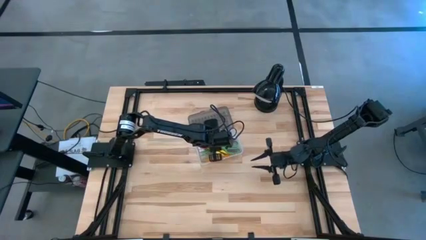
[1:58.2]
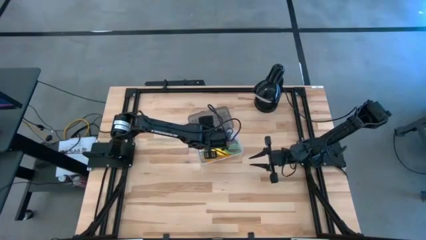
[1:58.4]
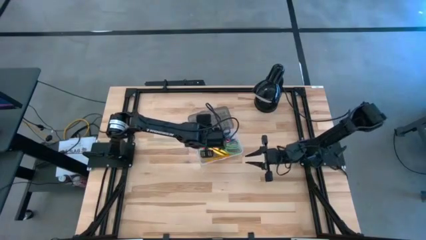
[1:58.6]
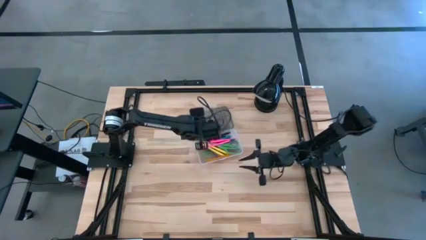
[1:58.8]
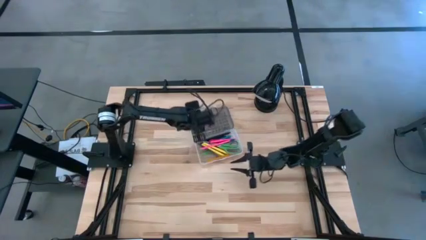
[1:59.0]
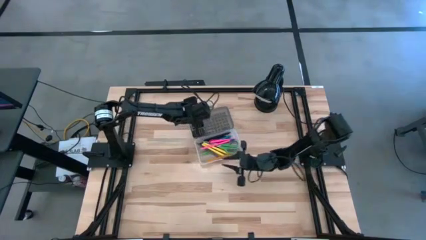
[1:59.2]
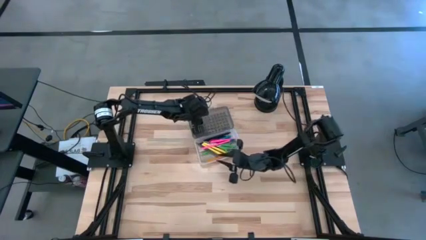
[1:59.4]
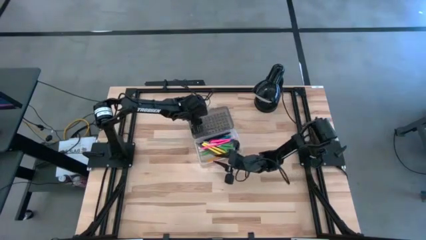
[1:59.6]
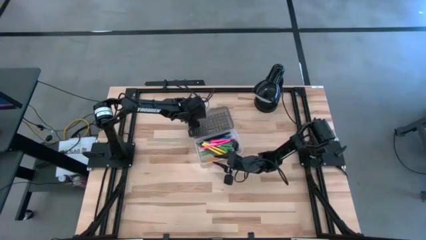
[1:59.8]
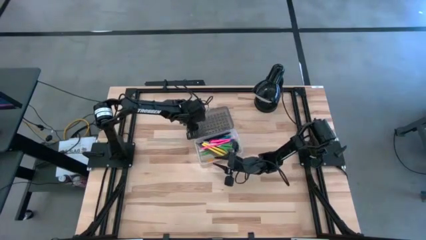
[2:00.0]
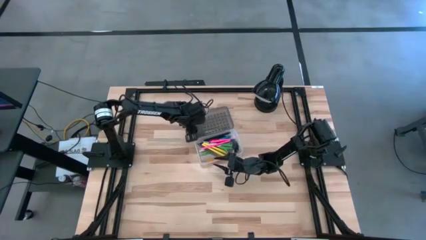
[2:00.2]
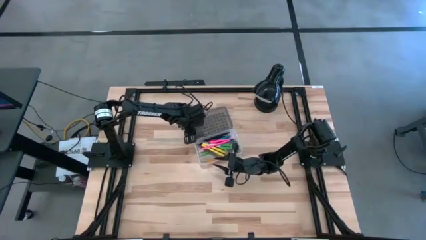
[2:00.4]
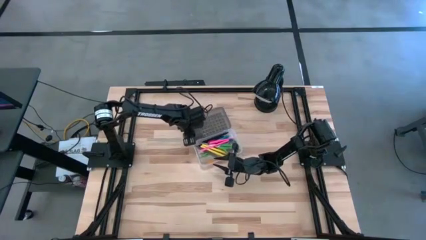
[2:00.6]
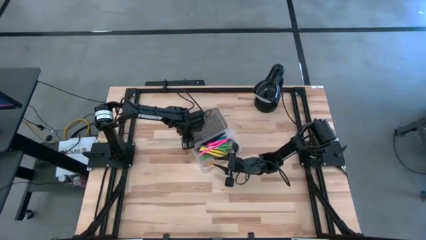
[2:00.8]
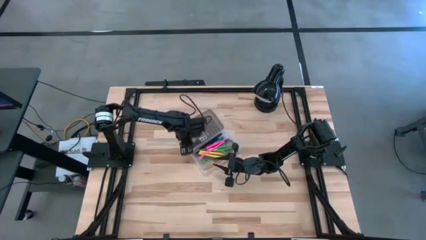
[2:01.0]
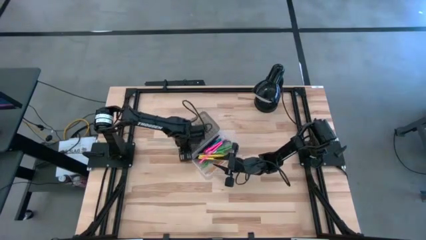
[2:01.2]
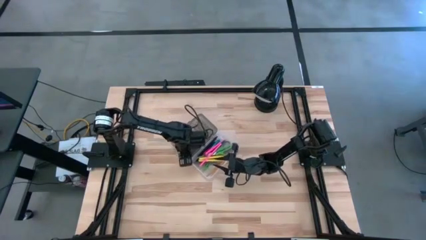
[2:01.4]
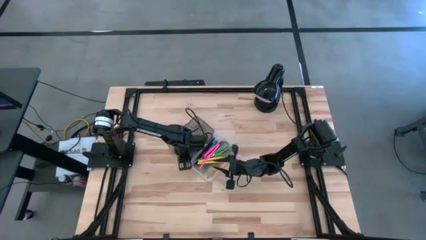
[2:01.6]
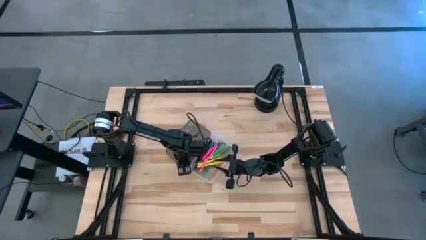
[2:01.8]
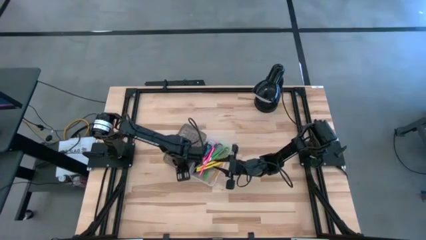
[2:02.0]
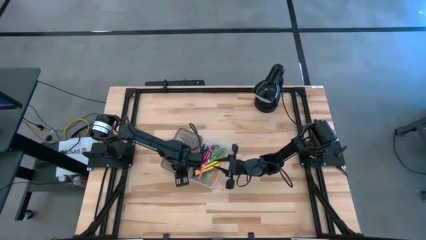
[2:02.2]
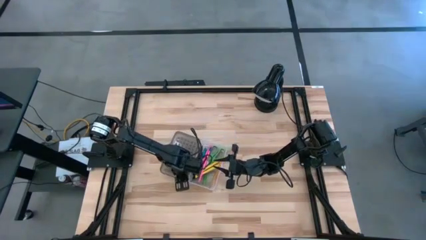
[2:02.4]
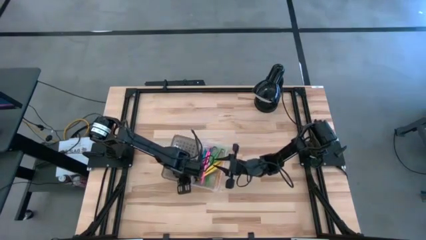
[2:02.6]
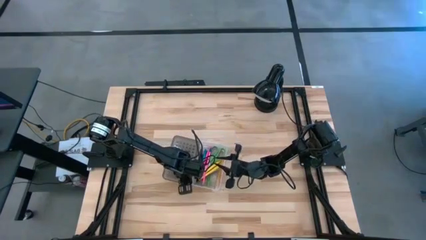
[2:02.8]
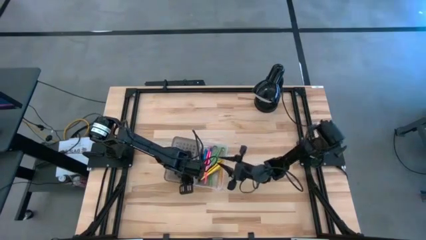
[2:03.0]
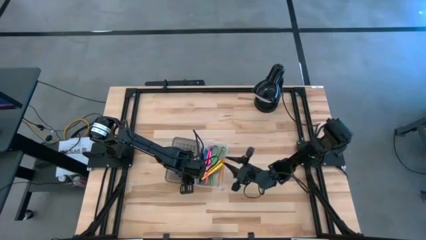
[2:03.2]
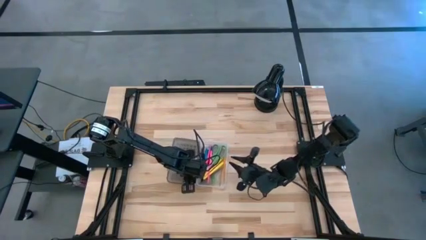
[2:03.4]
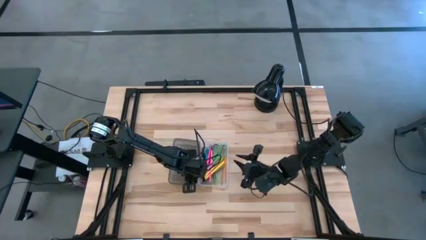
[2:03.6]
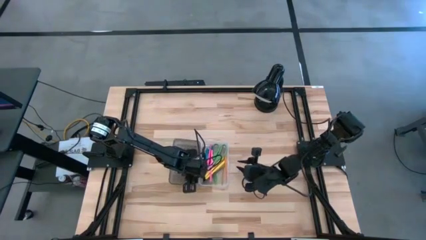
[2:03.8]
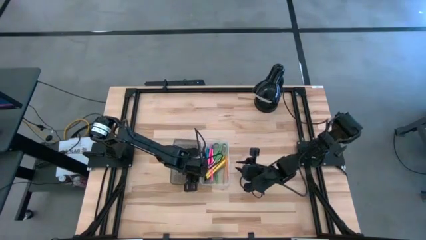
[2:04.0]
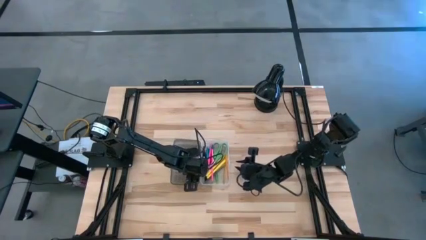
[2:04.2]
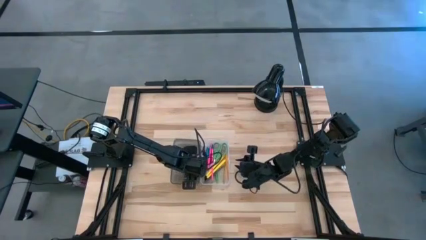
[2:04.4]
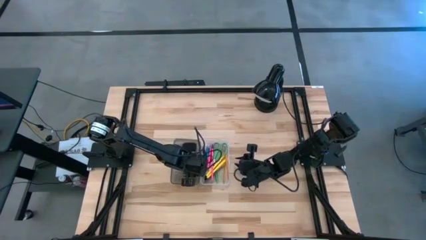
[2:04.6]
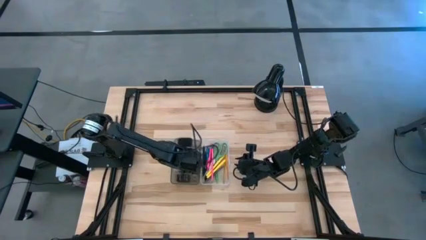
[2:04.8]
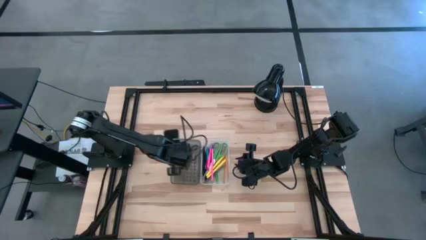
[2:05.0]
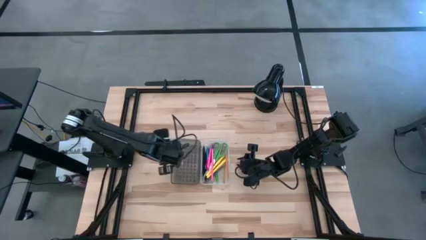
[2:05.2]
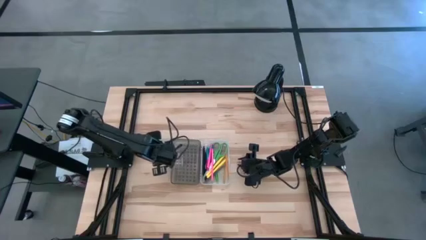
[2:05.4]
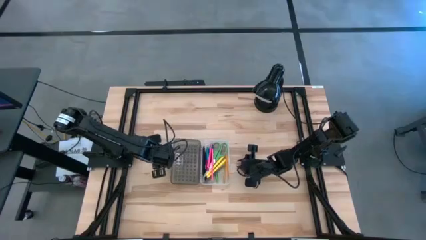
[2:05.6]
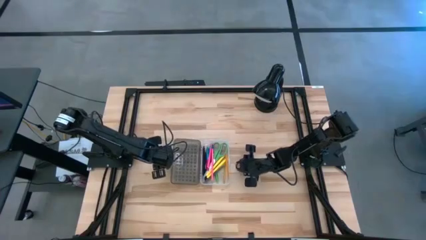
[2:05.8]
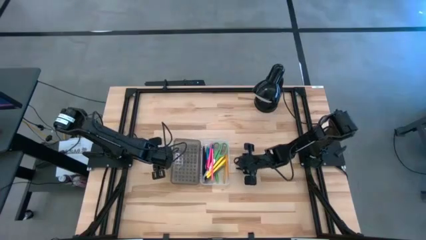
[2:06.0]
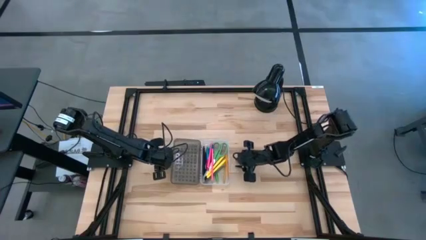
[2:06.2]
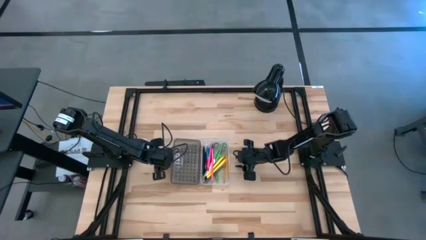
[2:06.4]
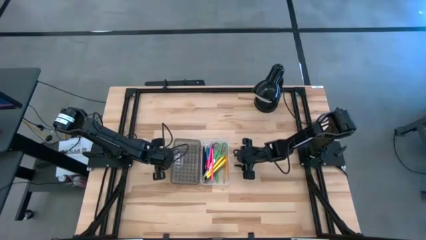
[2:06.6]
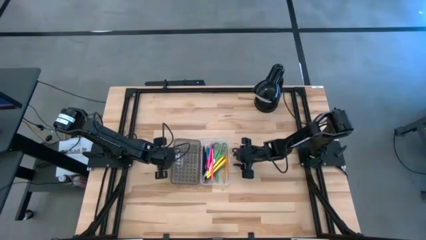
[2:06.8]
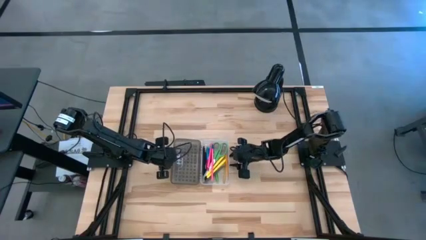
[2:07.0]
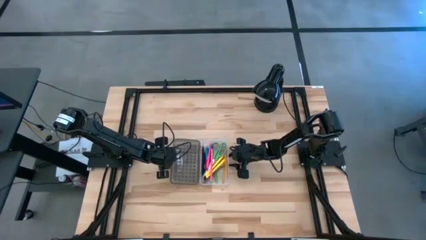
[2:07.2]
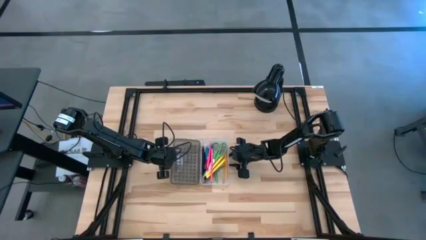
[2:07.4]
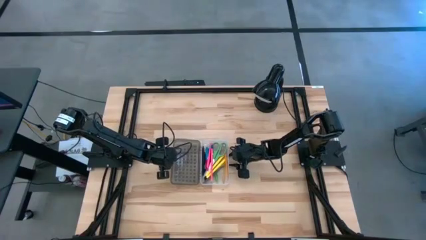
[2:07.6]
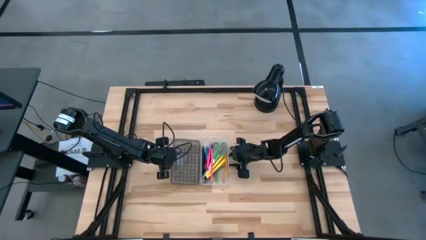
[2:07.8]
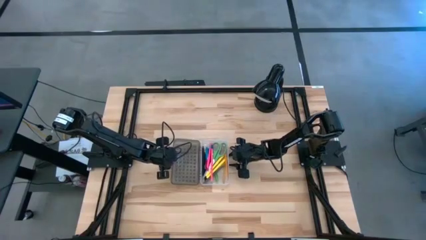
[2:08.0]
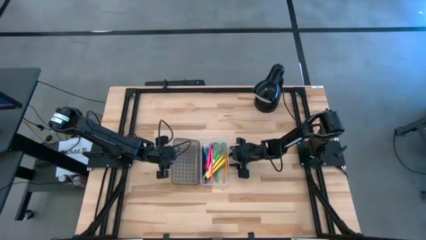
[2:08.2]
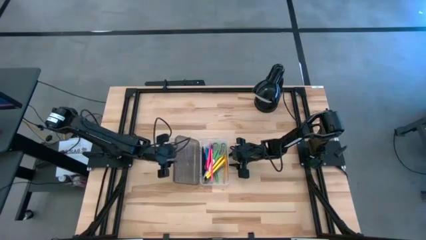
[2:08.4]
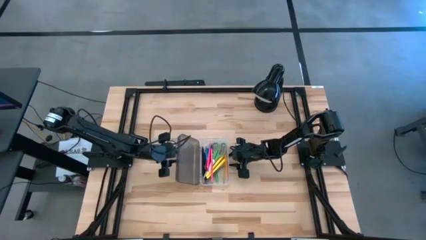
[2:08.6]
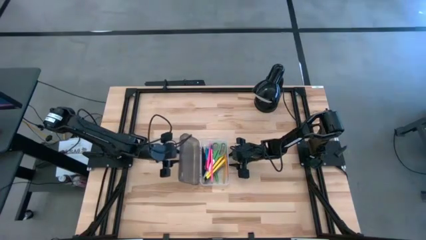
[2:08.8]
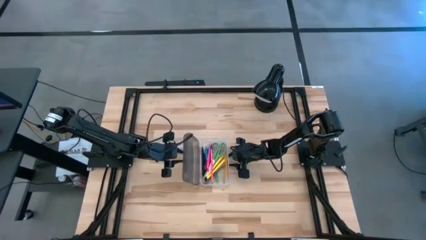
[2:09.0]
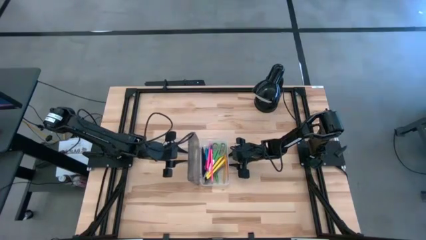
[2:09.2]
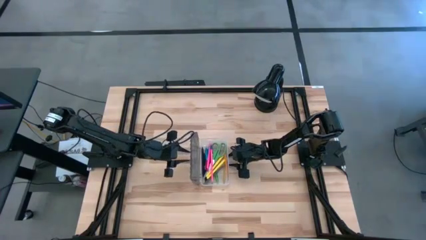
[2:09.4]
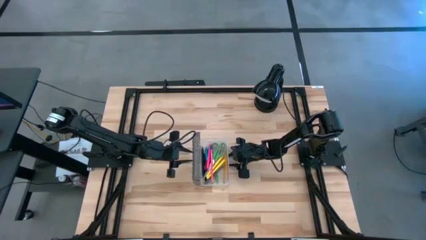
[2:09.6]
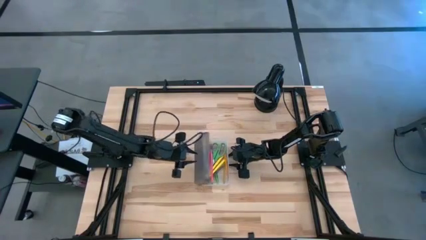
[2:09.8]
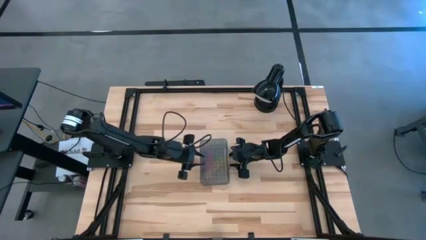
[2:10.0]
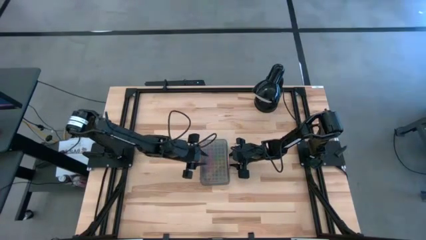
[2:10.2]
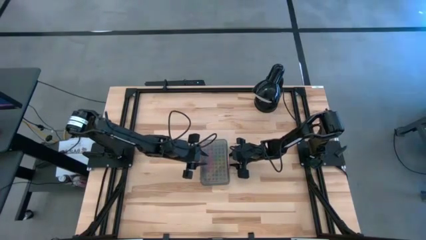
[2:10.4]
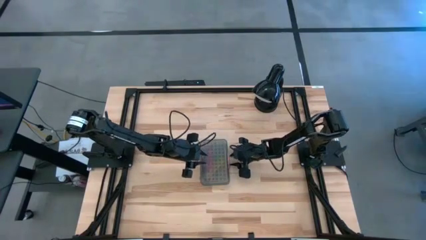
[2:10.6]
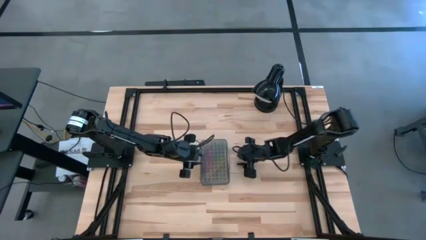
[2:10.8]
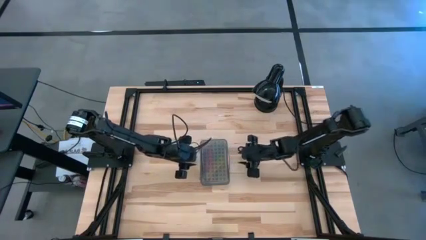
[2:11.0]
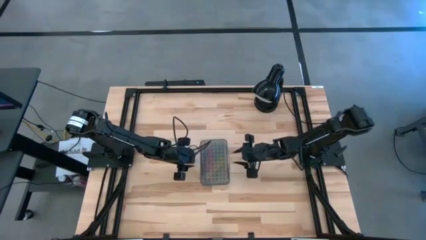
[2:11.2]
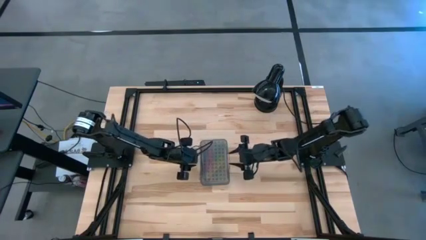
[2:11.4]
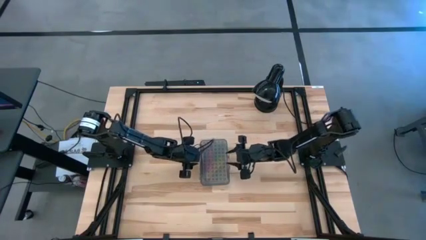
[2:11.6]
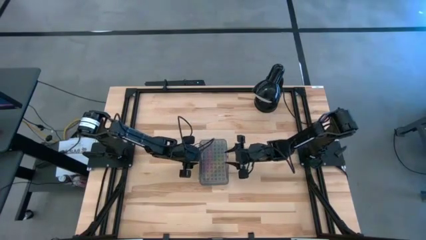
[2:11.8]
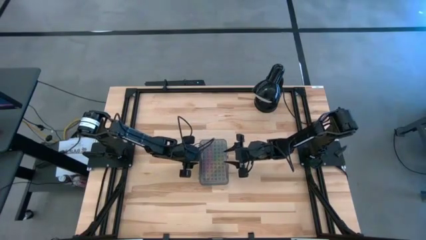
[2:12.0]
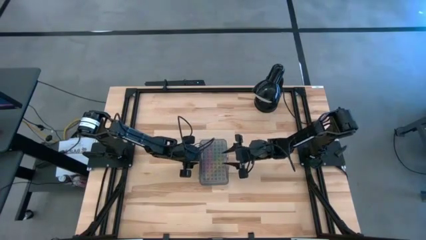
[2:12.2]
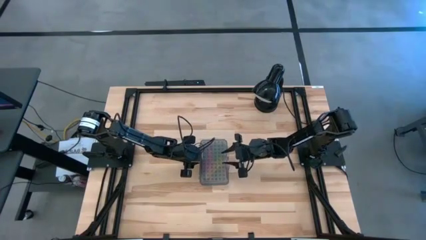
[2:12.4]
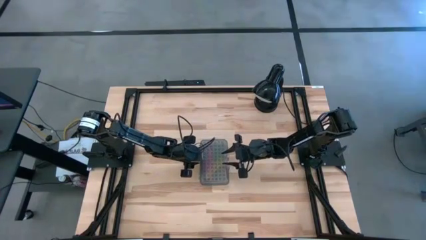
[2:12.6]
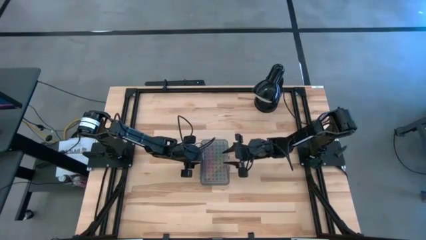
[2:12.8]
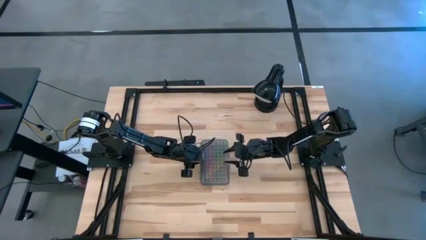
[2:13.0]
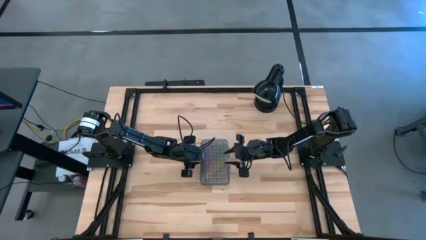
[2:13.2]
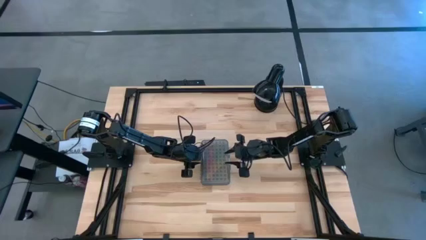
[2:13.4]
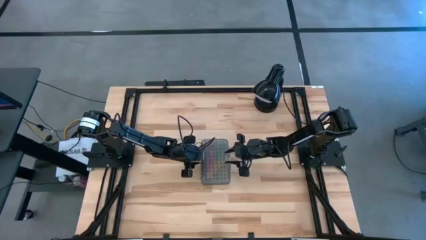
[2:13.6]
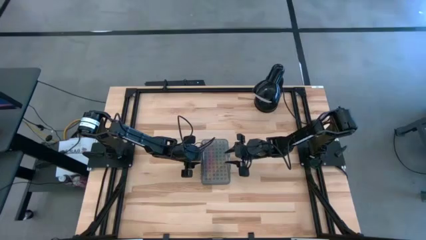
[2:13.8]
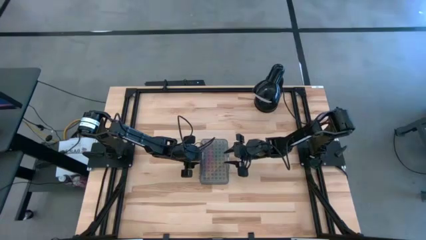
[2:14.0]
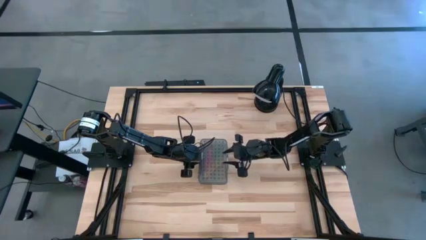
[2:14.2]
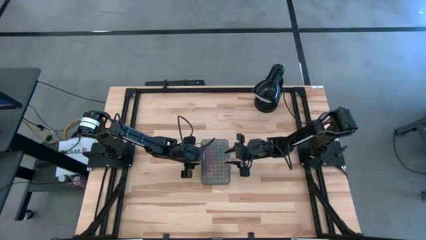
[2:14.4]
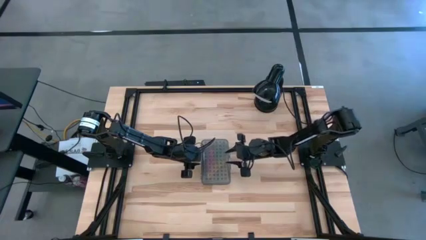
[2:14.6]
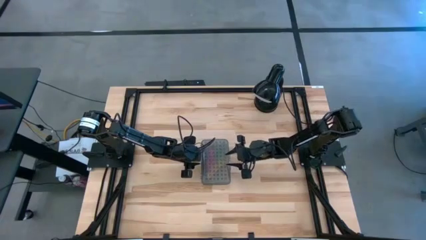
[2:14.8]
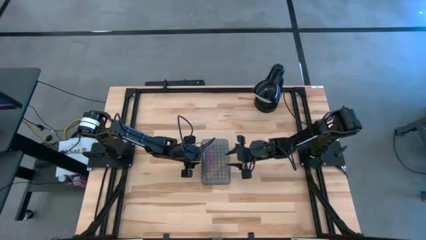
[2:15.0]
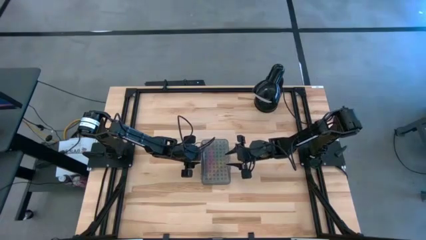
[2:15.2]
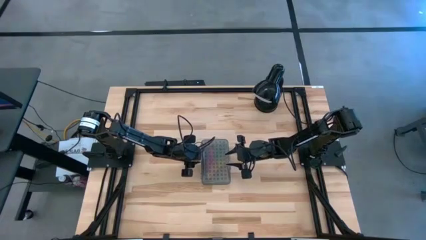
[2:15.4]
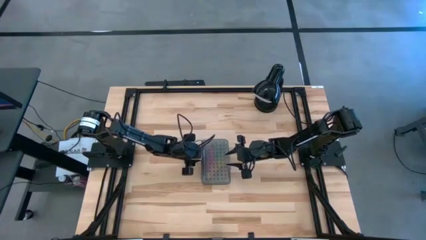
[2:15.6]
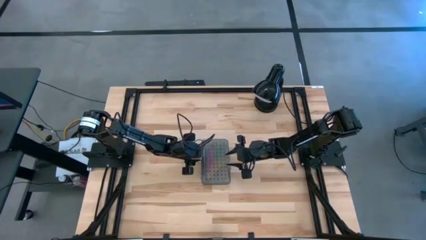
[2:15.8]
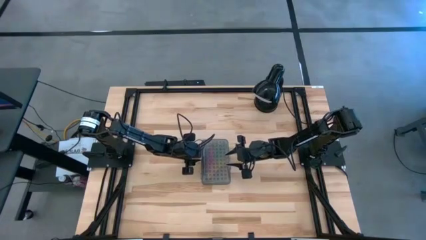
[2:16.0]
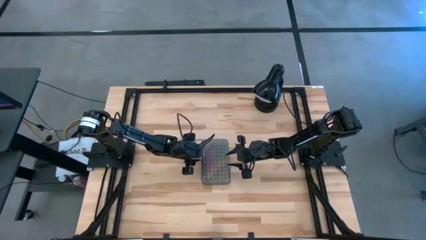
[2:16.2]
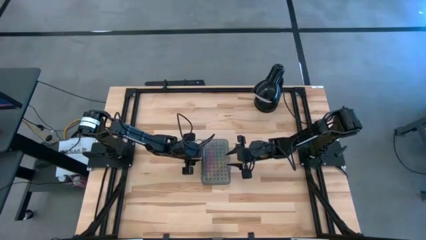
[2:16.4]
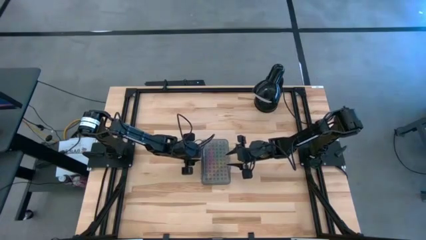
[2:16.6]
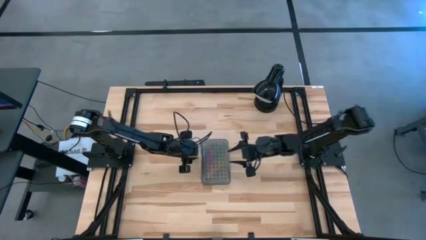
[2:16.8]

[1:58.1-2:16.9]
Task: Pick & place school supplies into a supply box
Close the transparent supply box
